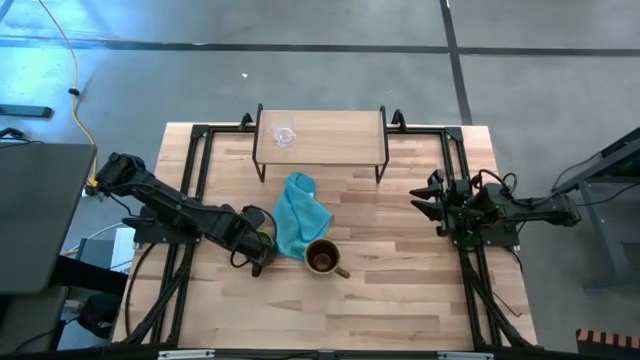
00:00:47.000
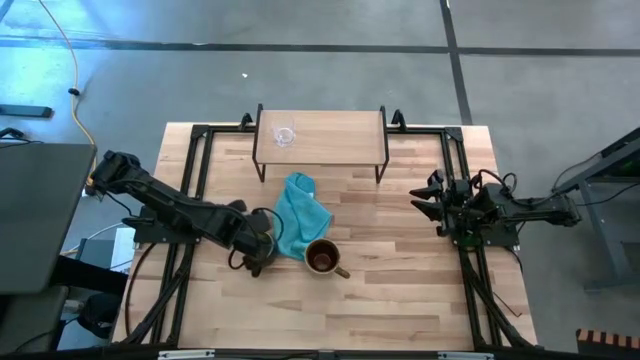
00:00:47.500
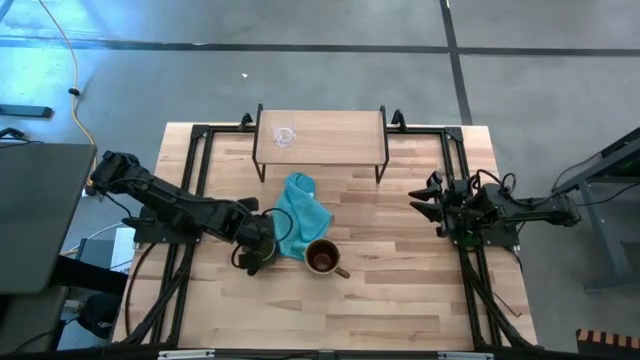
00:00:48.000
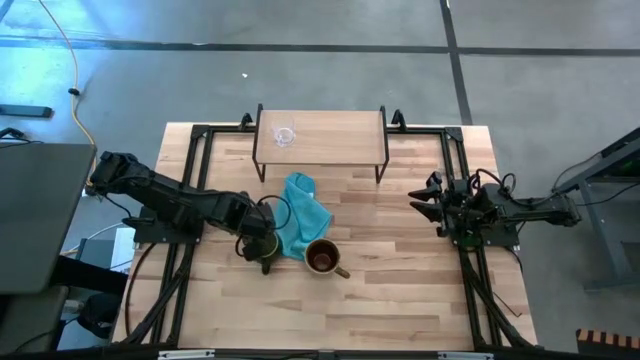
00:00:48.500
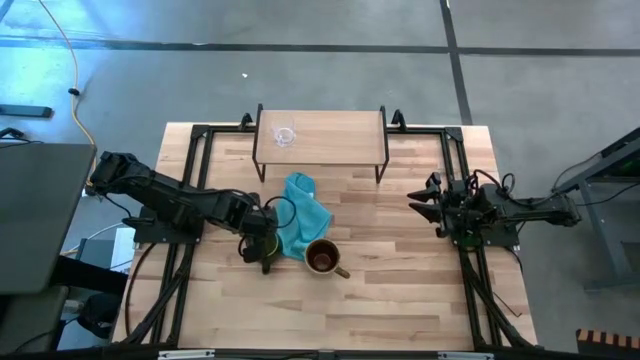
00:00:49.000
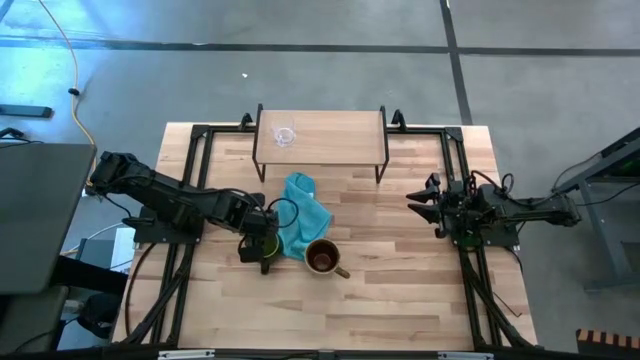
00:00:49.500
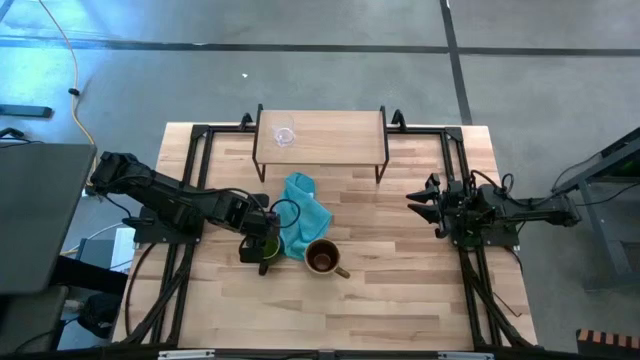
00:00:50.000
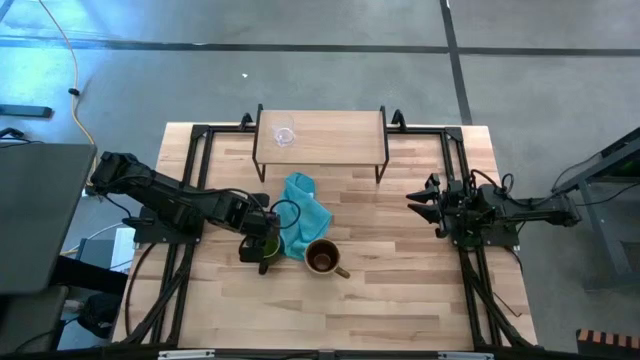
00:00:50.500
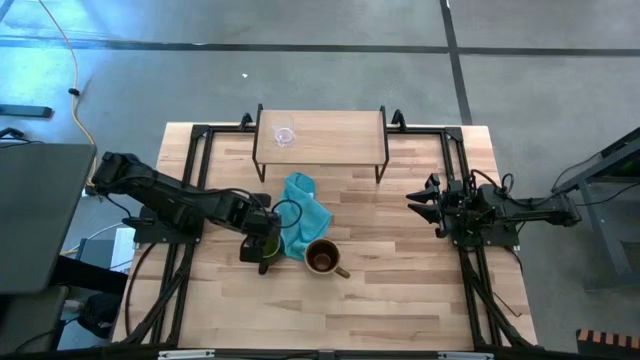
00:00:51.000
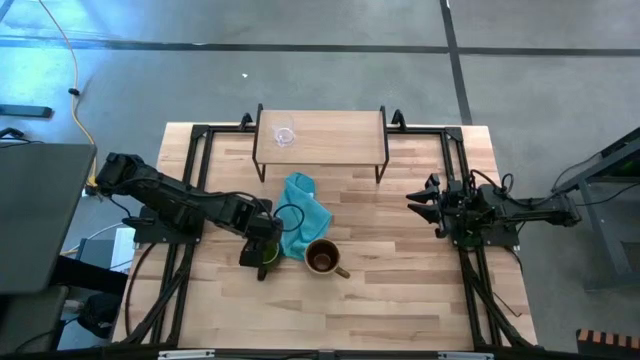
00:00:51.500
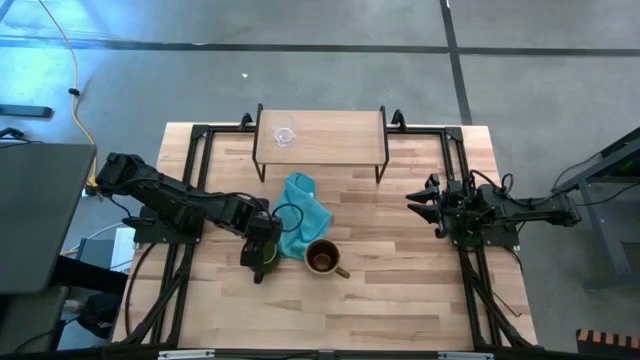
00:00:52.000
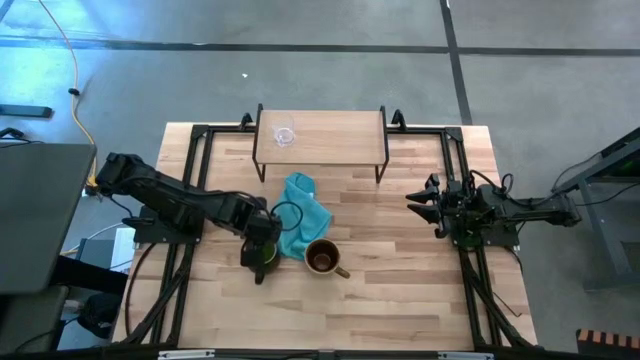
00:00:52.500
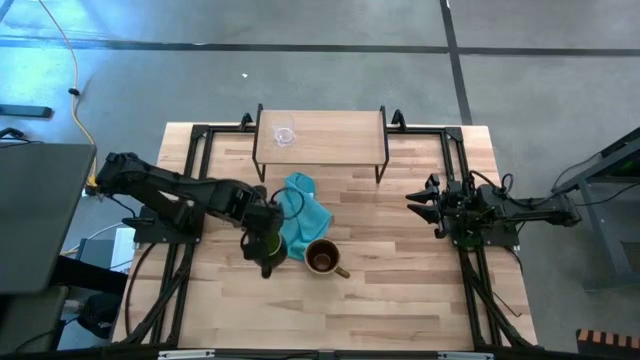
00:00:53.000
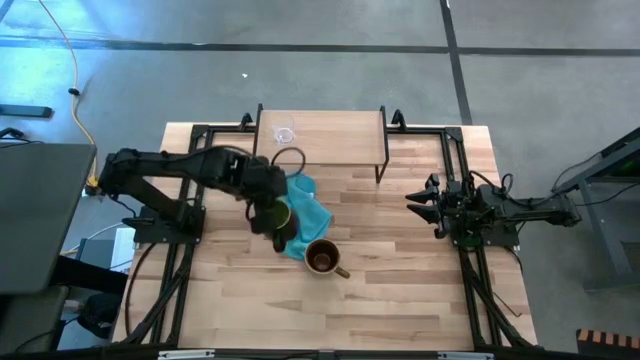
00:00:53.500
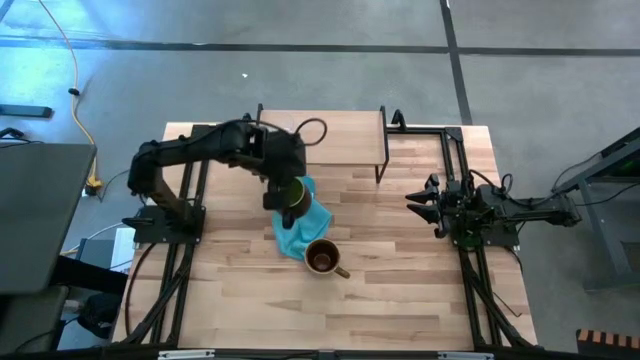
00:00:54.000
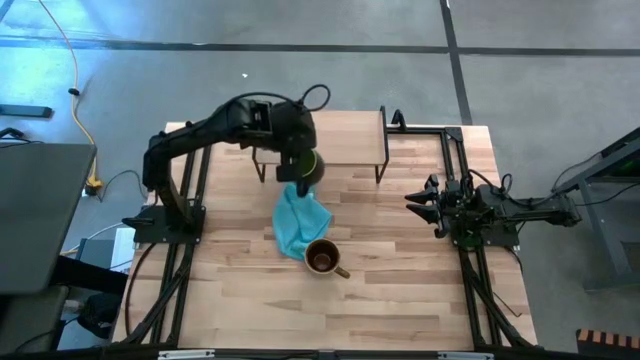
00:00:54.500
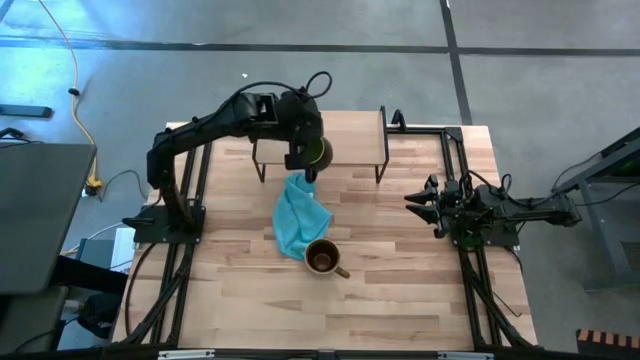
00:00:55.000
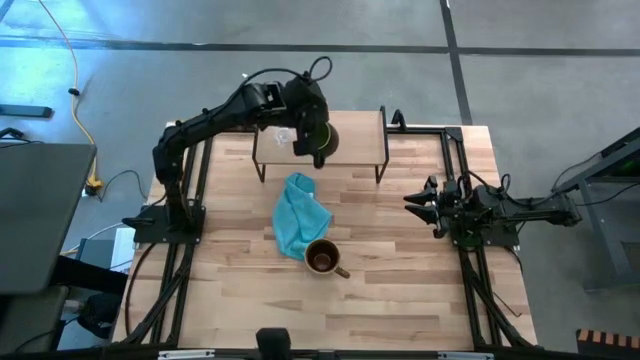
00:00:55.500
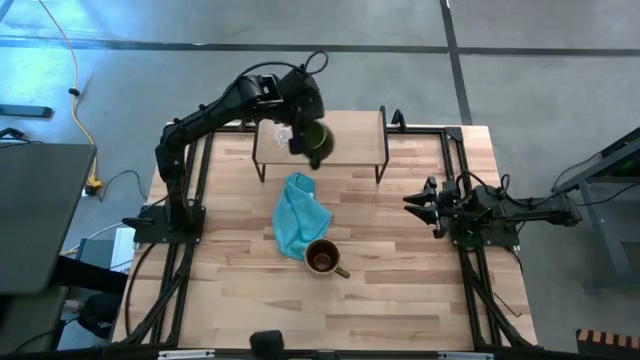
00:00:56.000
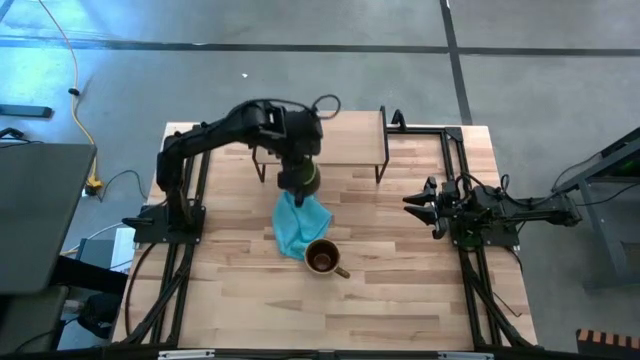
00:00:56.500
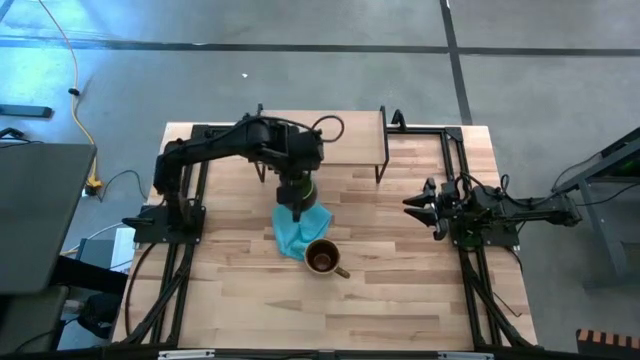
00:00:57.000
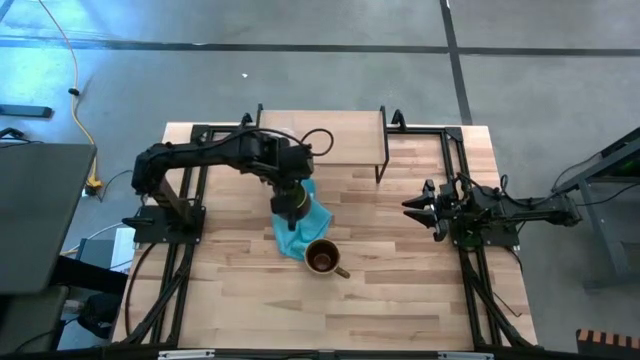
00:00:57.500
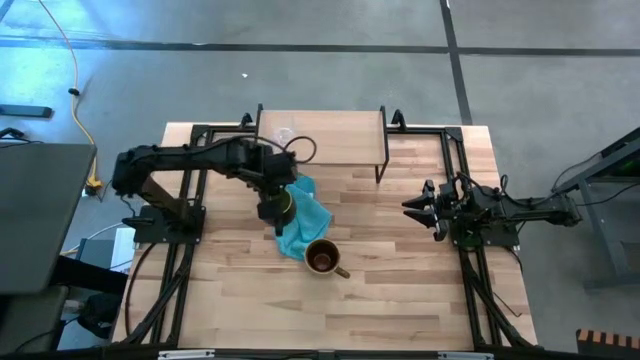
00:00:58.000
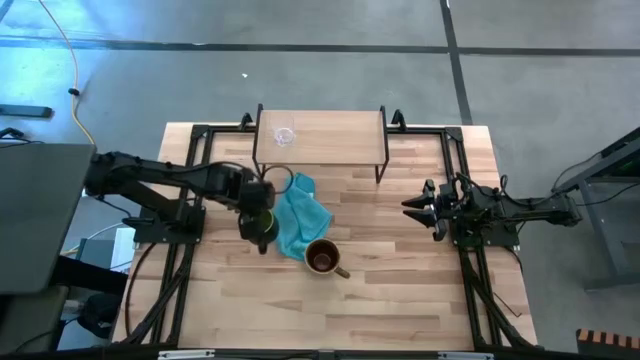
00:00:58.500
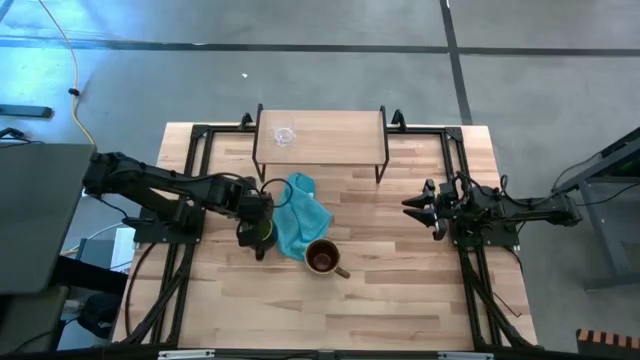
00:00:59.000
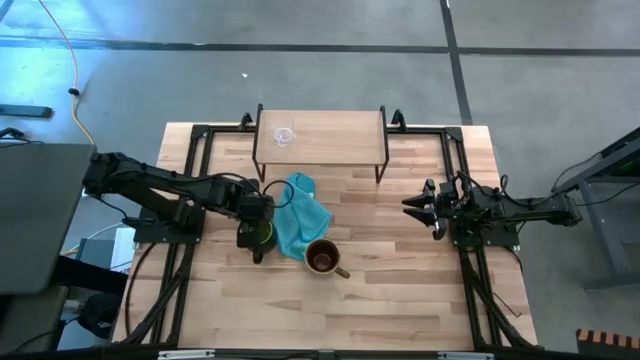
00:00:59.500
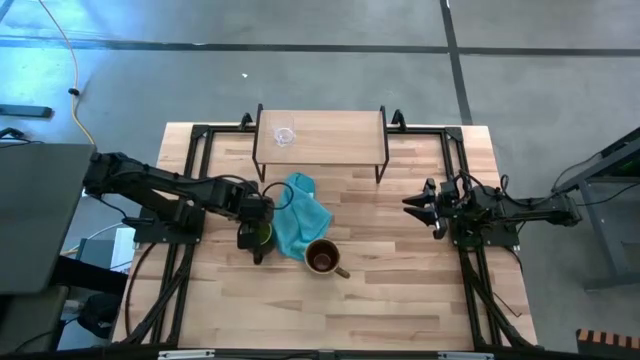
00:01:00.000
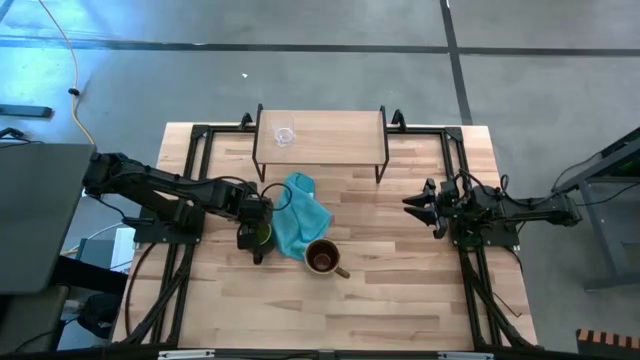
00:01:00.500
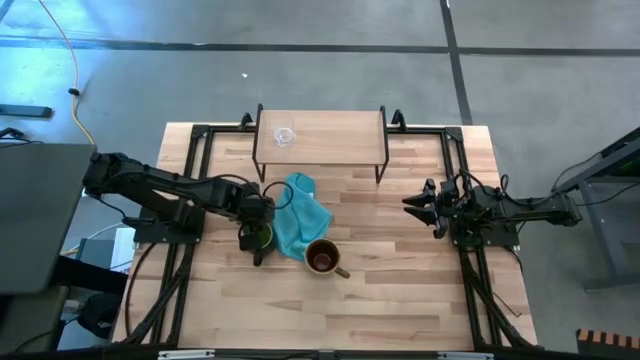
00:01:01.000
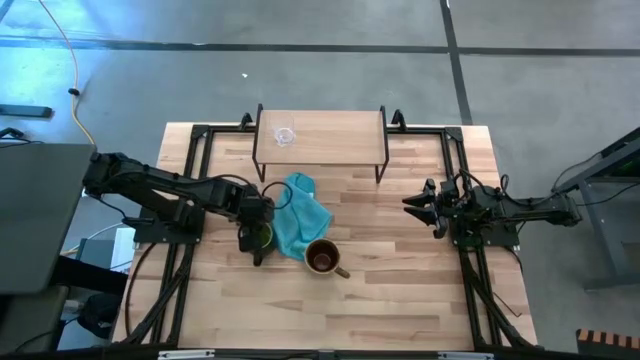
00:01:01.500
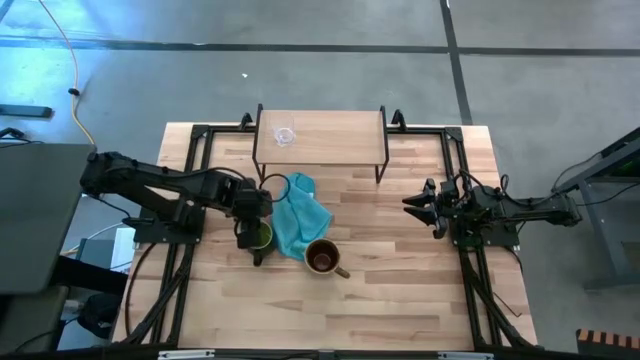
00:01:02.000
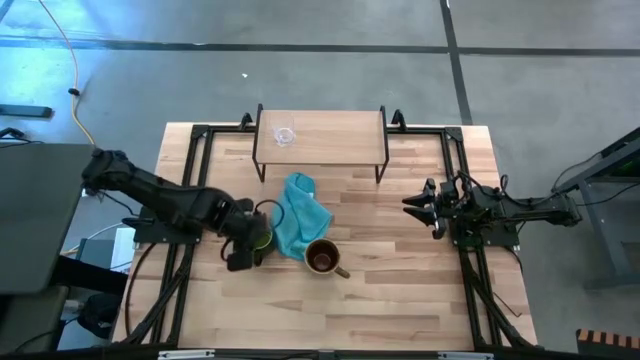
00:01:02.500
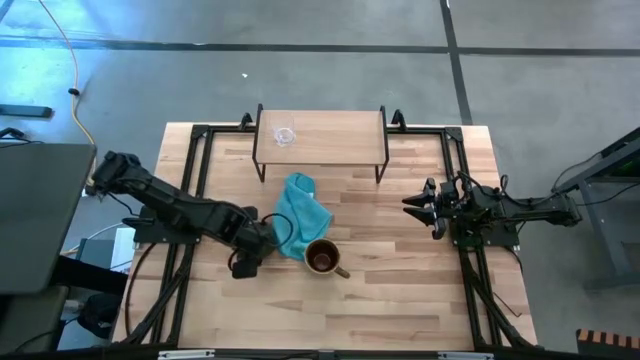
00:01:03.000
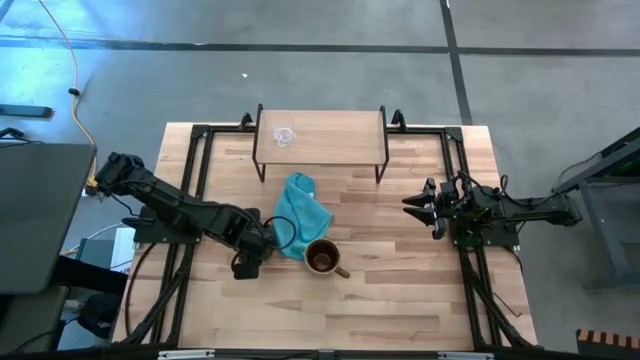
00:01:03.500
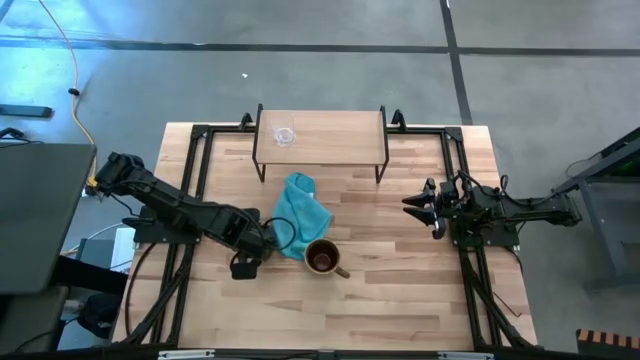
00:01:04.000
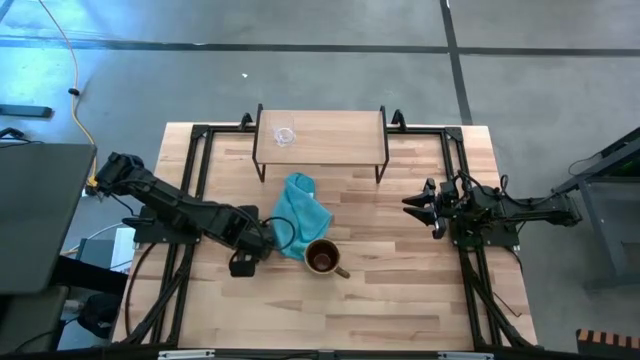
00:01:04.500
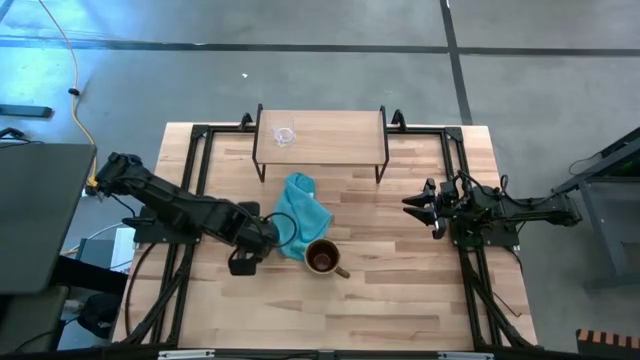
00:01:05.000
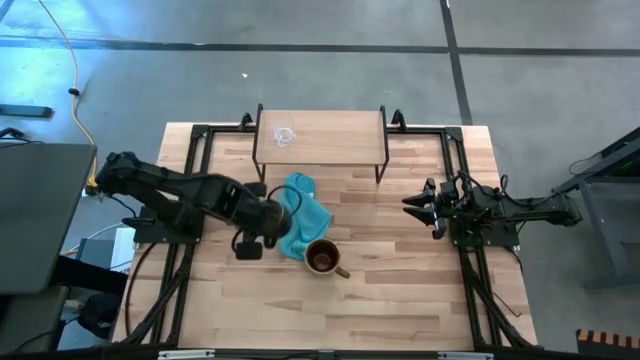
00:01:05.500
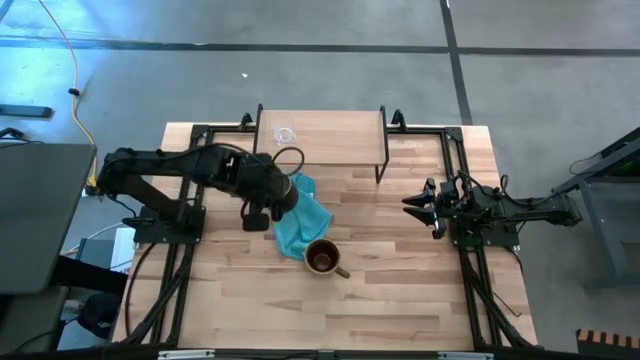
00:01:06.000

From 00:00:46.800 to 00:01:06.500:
Task: Stack small to large cups/mugs on shelf
Put the green mug on the shelf
